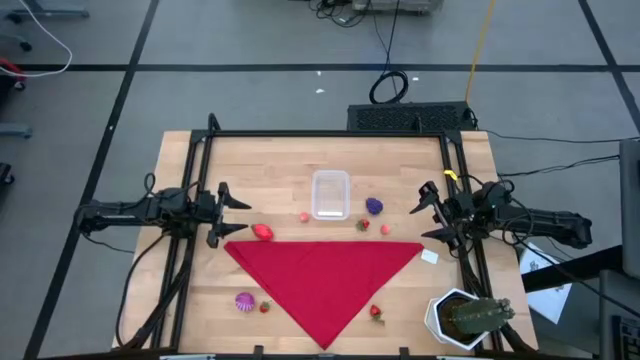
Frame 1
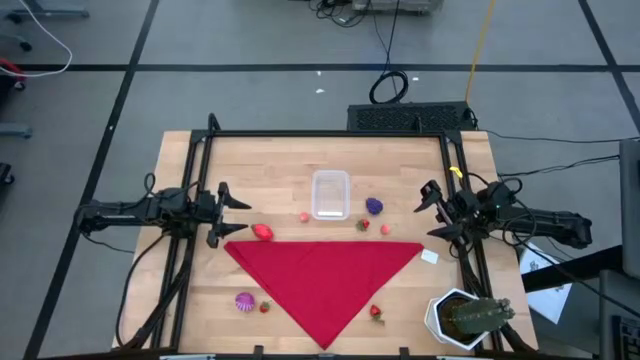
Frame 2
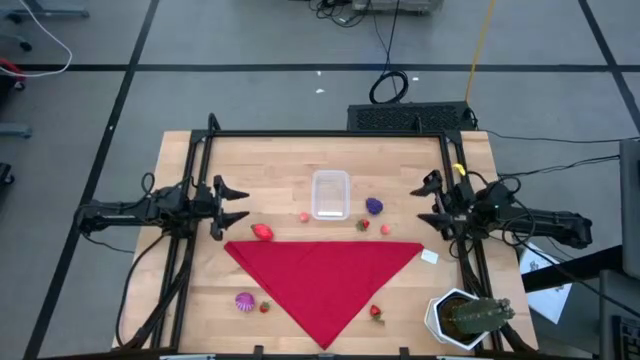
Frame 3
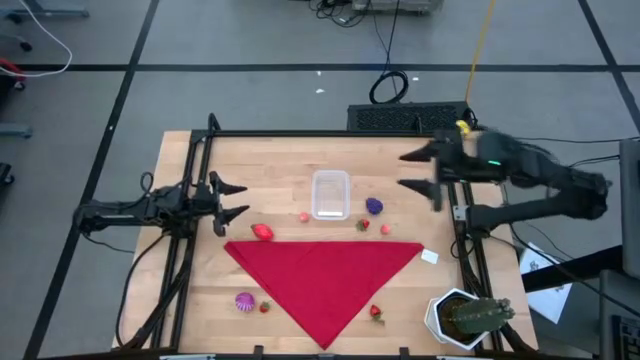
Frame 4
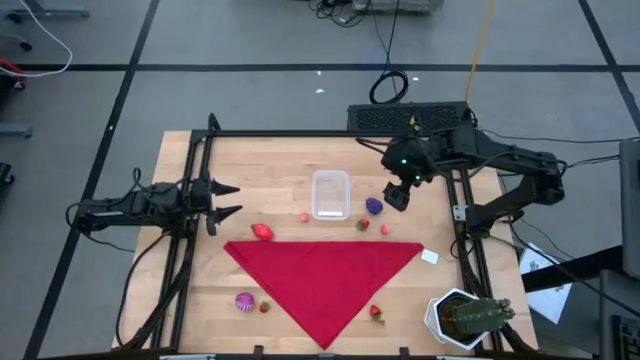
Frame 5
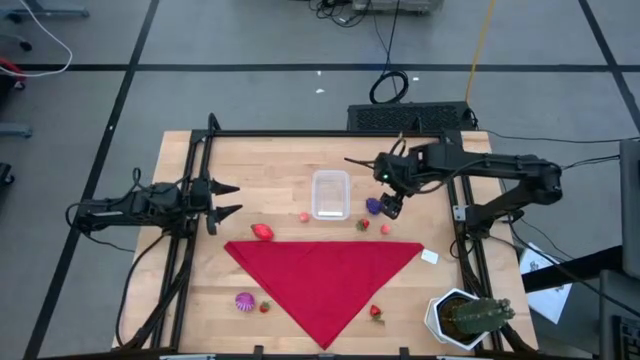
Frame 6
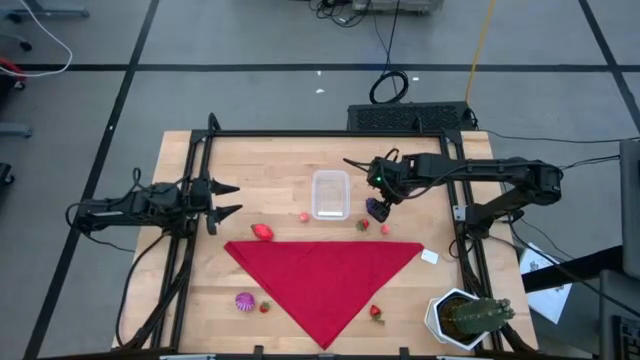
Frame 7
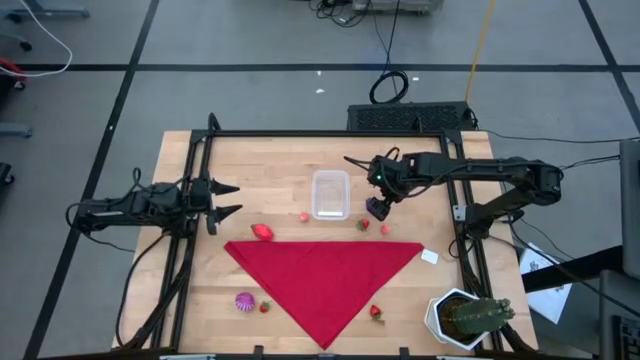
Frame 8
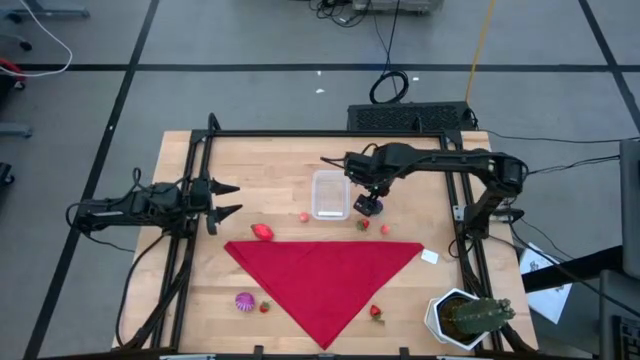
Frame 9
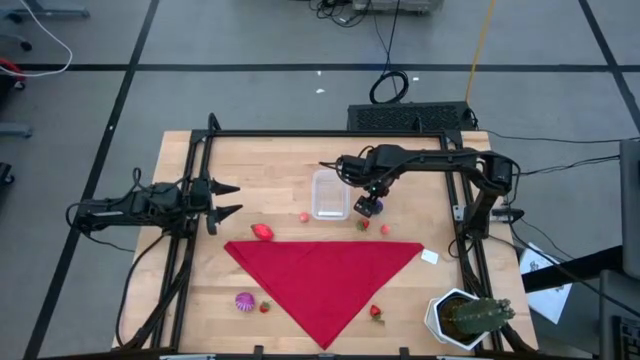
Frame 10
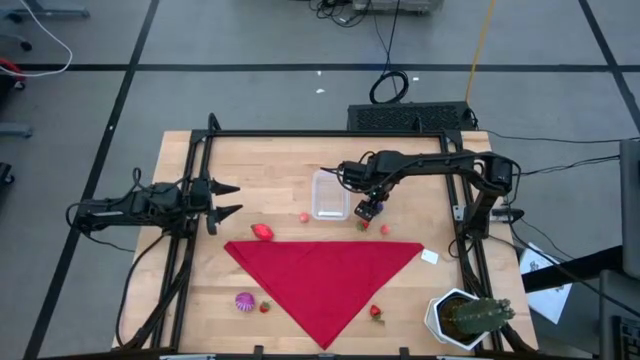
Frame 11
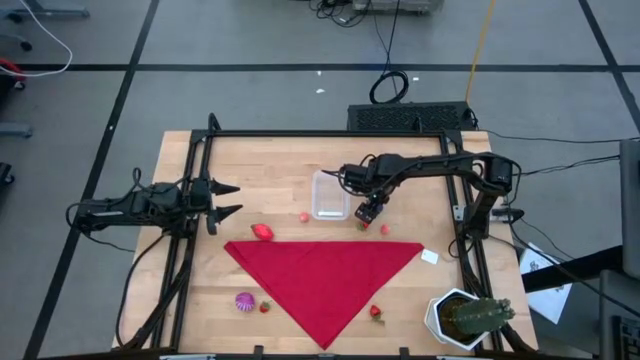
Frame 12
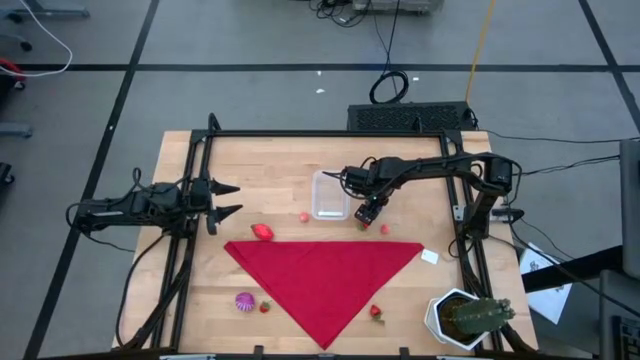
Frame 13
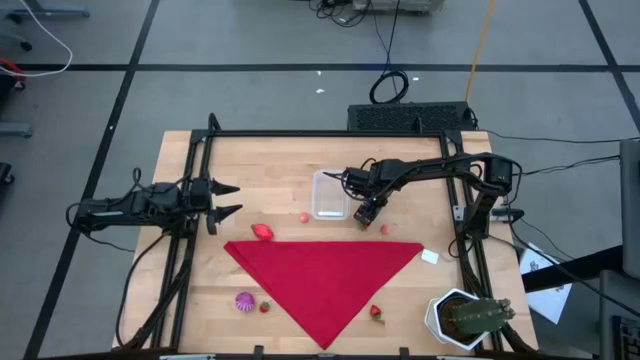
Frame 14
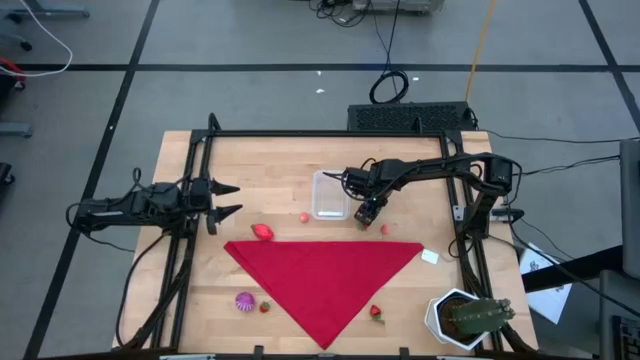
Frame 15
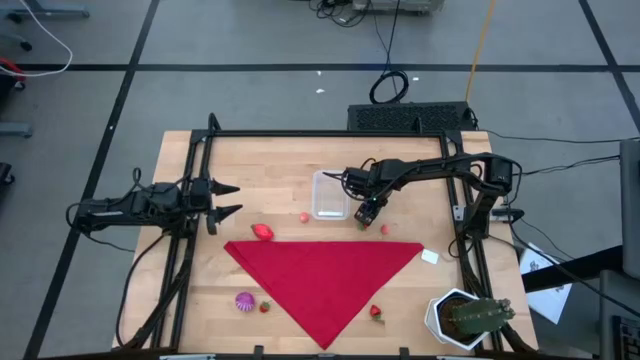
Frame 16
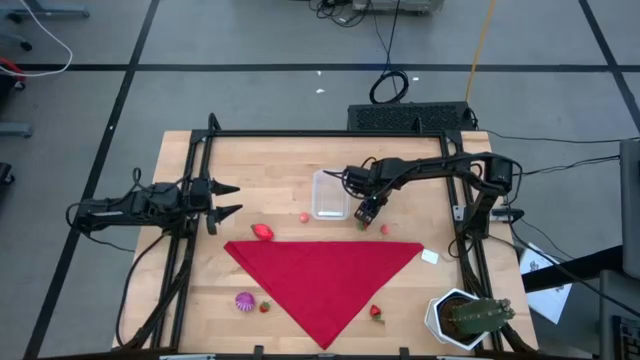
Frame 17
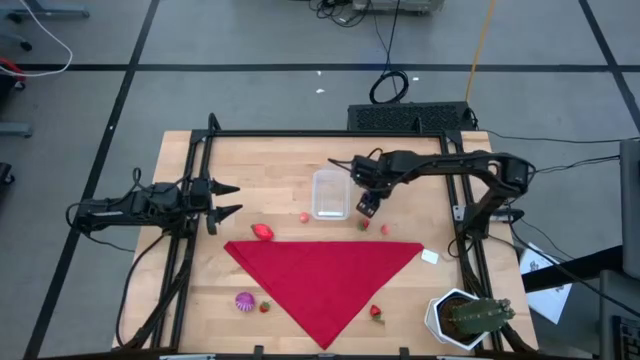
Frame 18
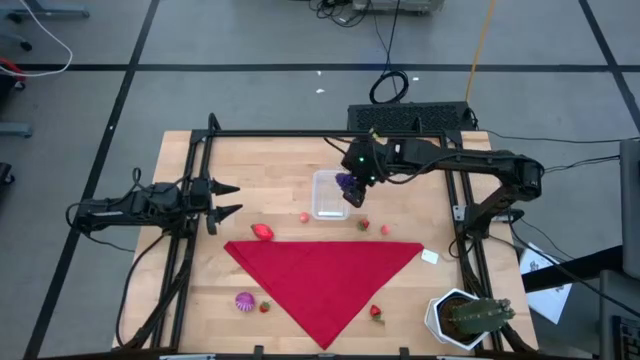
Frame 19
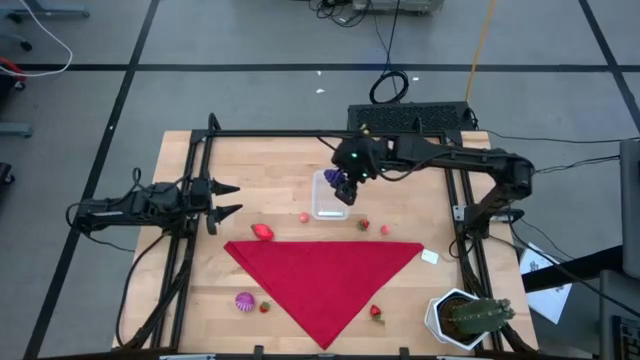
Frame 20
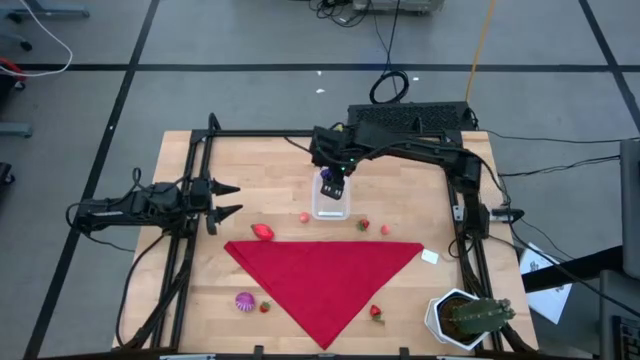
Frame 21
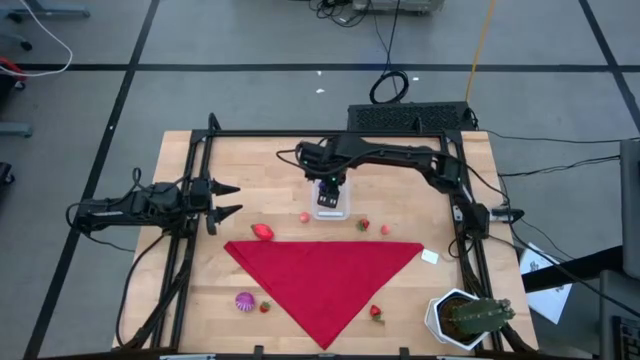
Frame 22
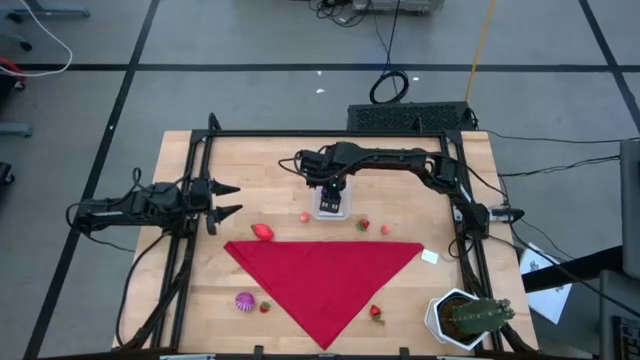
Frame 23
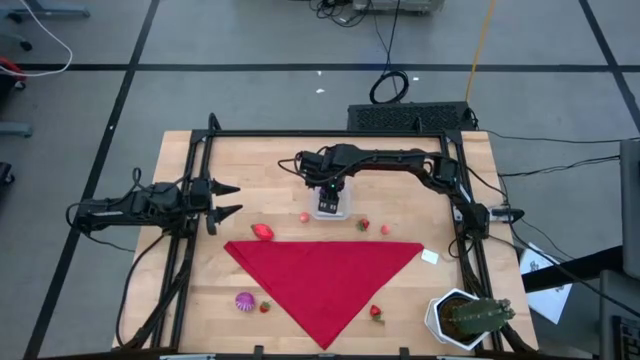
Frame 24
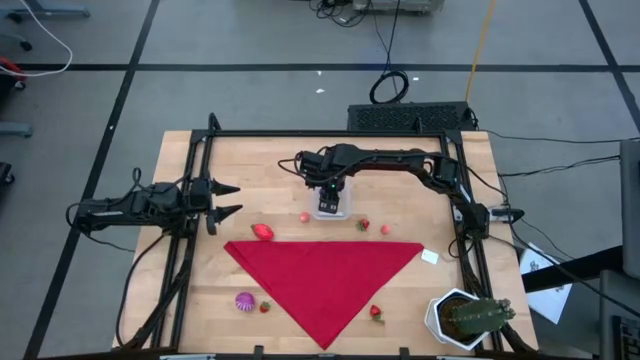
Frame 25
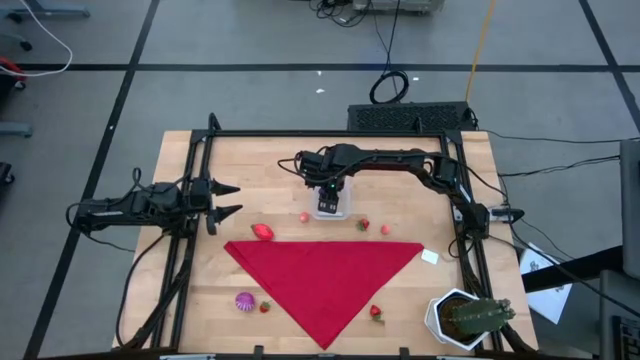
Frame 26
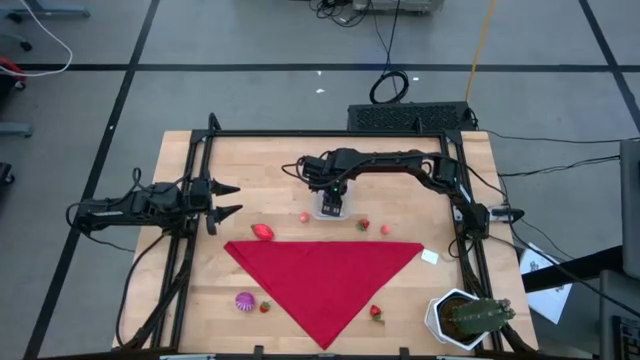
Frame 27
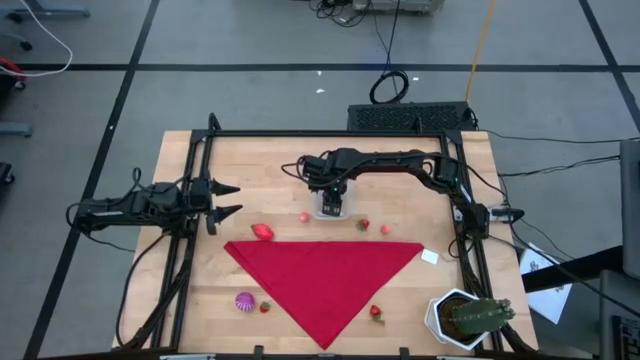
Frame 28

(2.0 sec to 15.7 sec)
Task: Pick and placing Produce into tupperware
Put the blue grapes into the transparent bin

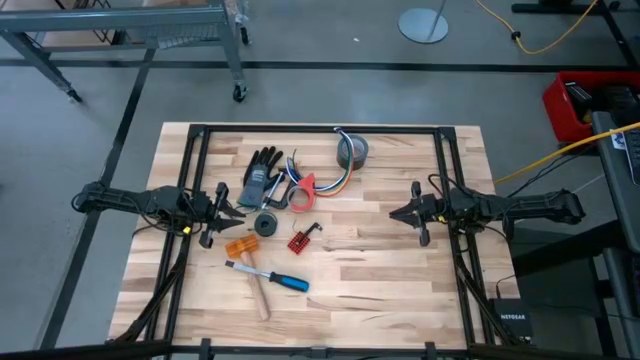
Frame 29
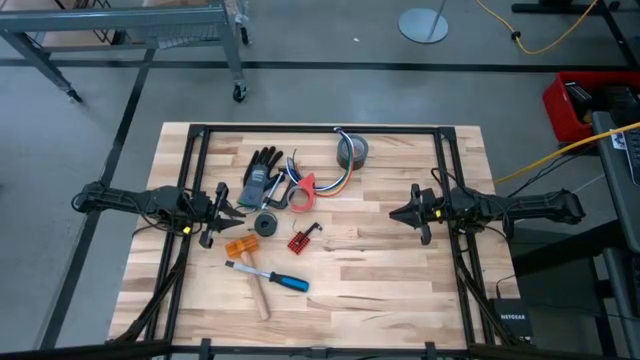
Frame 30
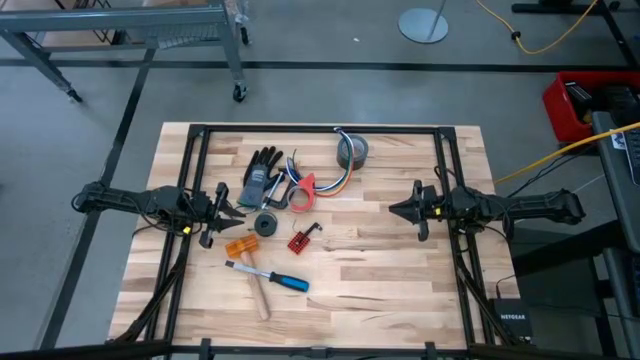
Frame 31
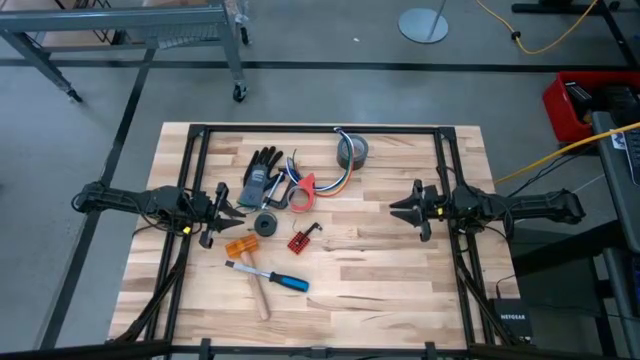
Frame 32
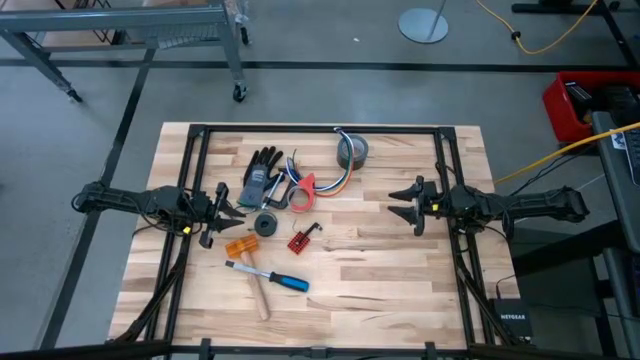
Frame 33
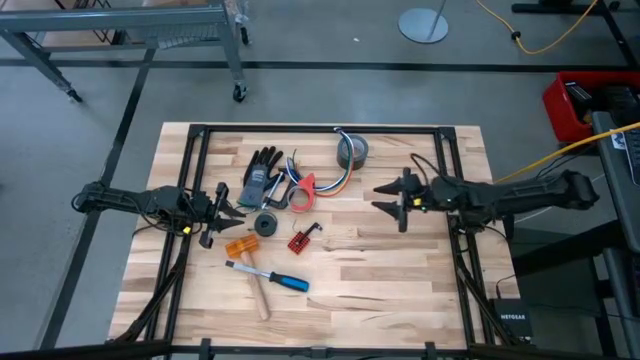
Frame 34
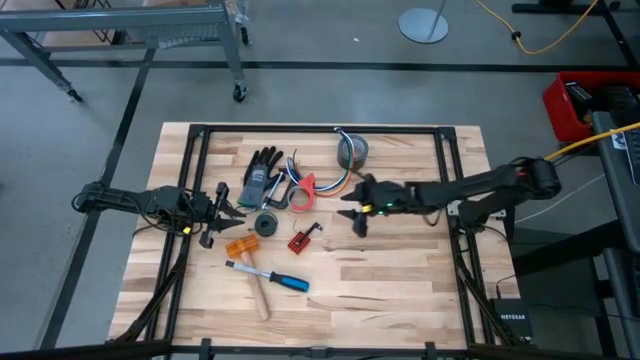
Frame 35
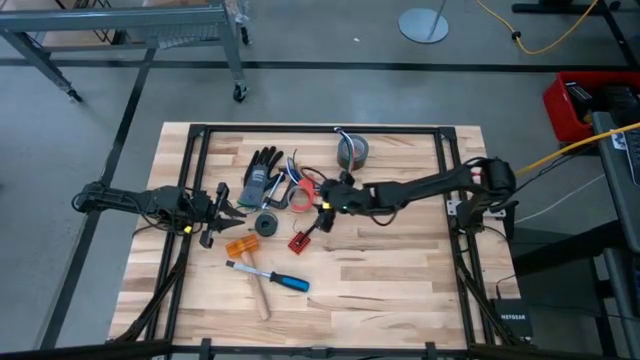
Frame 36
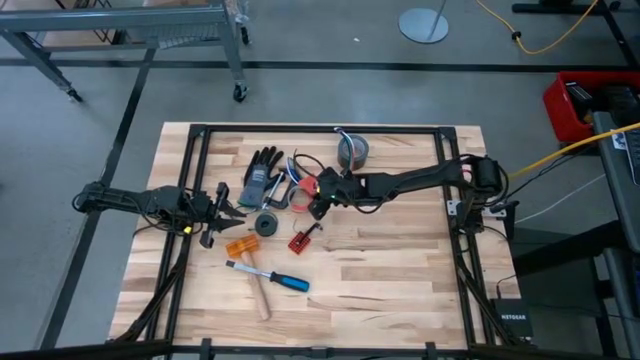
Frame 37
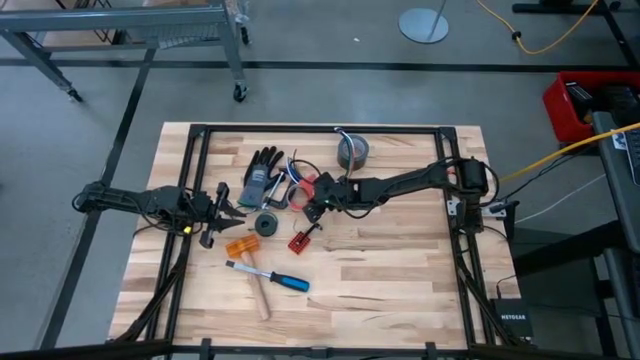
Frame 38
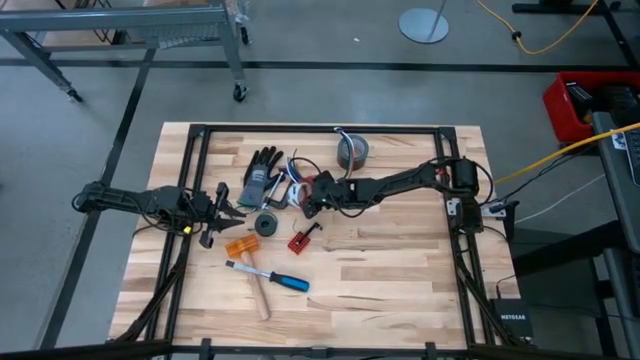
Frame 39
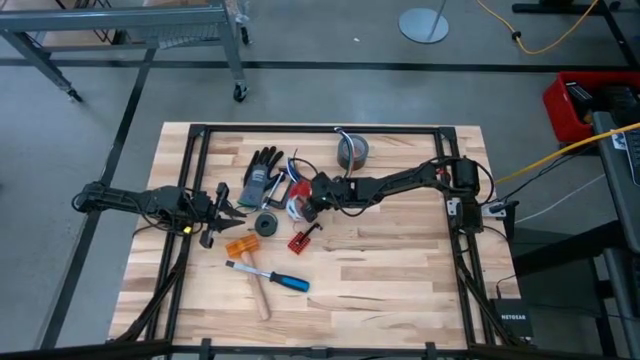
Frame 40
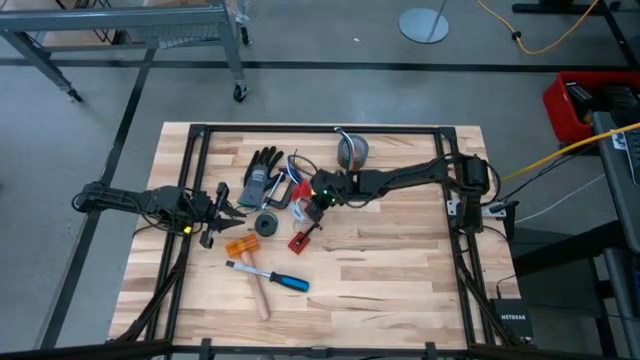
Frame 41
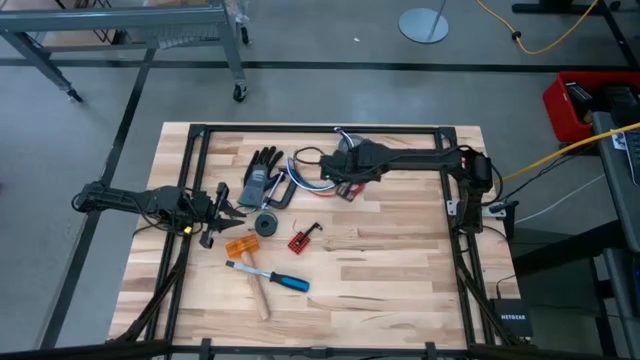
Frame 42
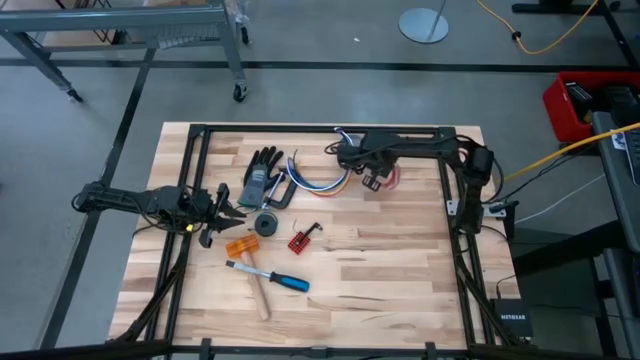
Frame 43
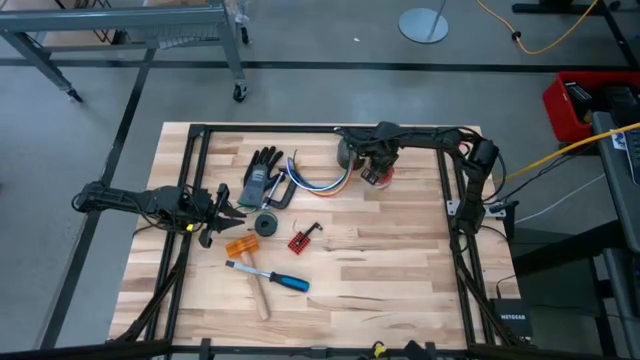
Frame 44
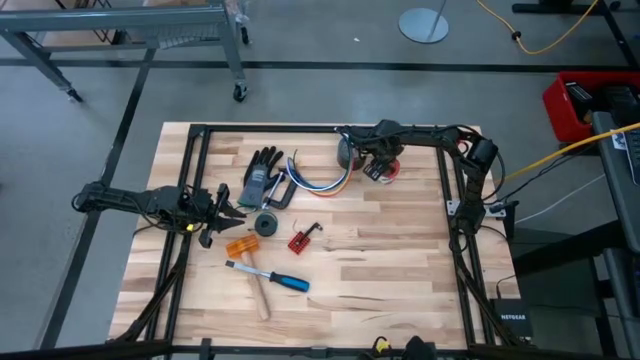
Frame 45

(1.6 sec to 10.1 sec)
Task: Coil cords
Move the tape dispenser to the top right of the table
